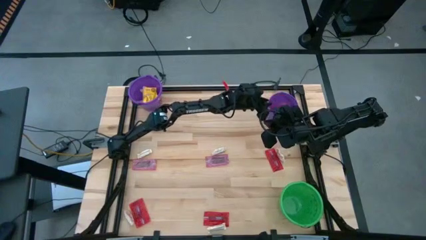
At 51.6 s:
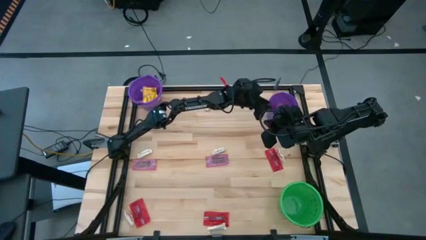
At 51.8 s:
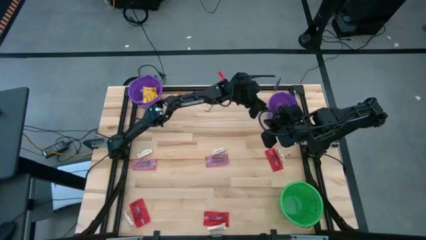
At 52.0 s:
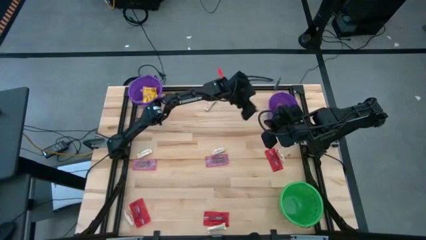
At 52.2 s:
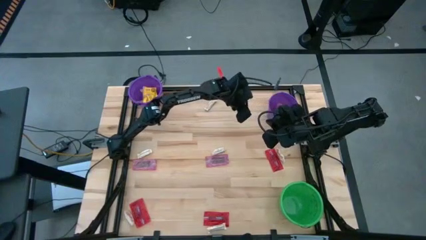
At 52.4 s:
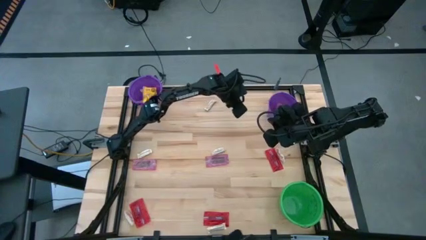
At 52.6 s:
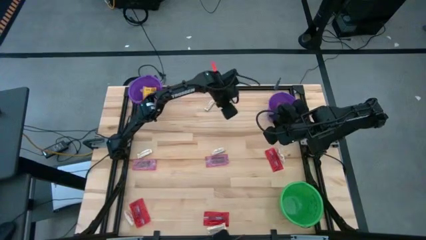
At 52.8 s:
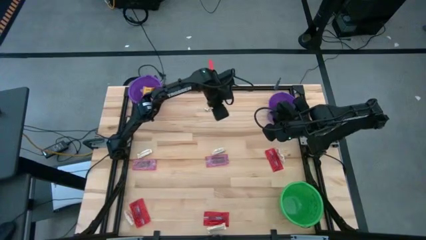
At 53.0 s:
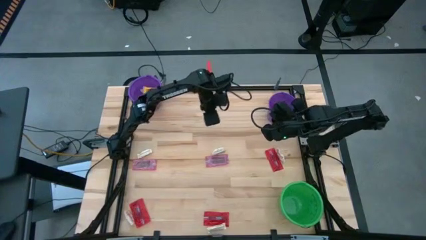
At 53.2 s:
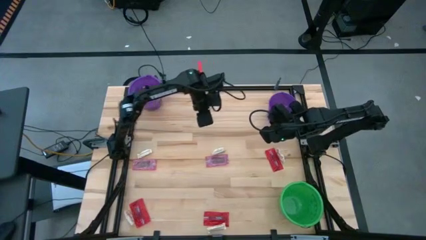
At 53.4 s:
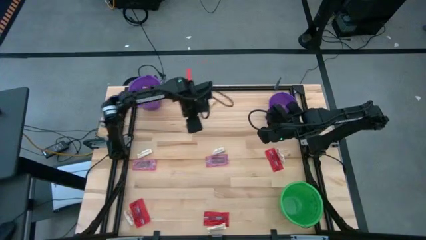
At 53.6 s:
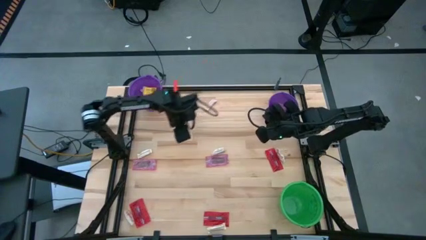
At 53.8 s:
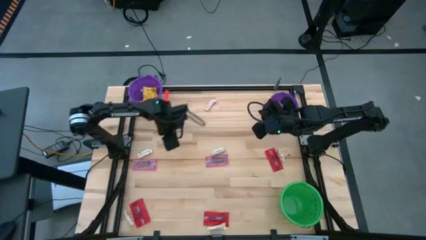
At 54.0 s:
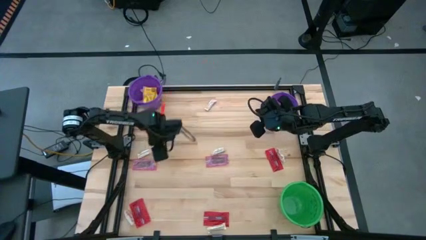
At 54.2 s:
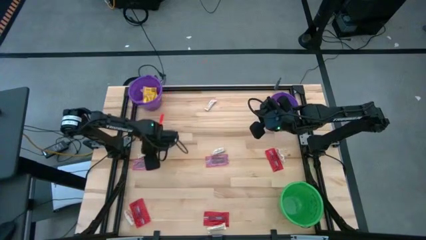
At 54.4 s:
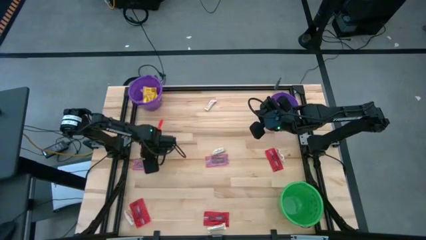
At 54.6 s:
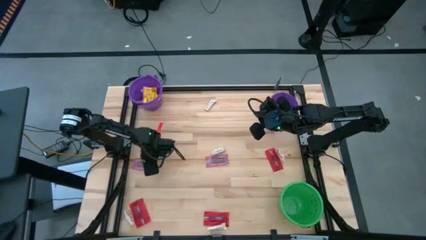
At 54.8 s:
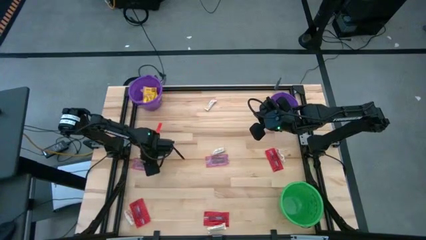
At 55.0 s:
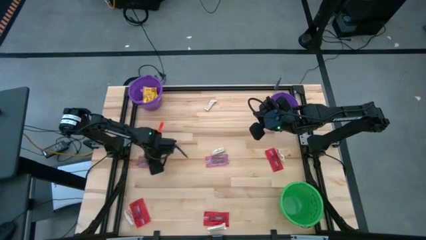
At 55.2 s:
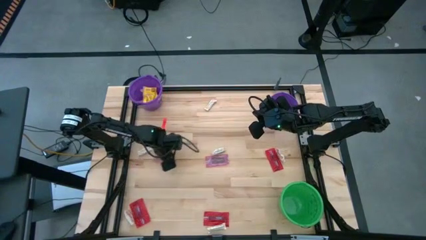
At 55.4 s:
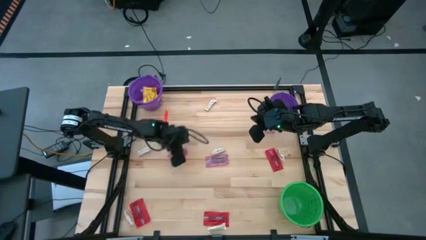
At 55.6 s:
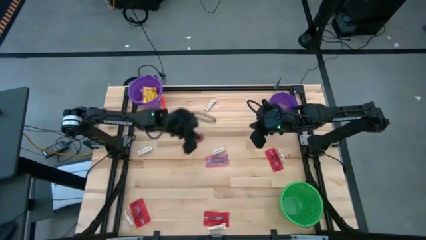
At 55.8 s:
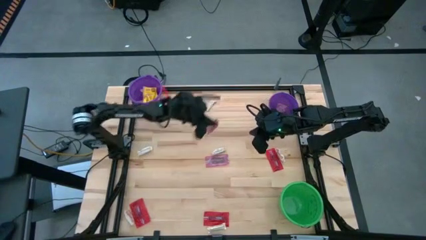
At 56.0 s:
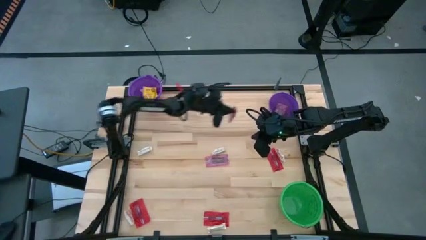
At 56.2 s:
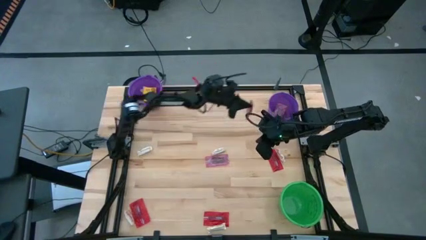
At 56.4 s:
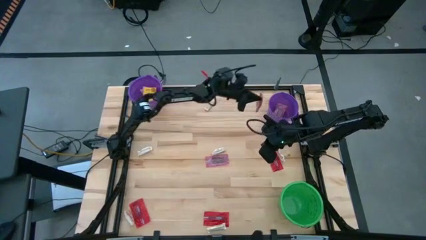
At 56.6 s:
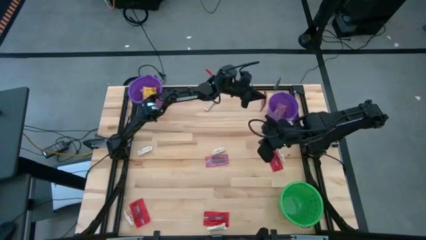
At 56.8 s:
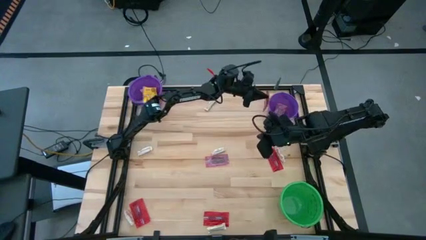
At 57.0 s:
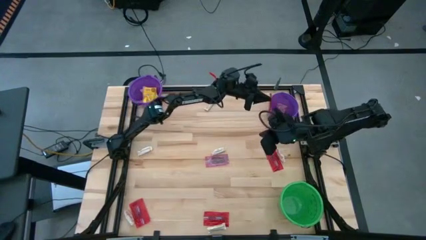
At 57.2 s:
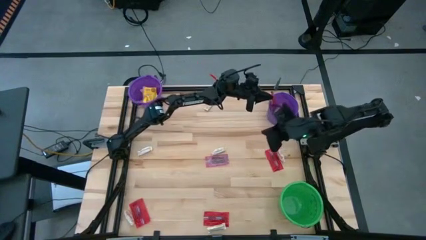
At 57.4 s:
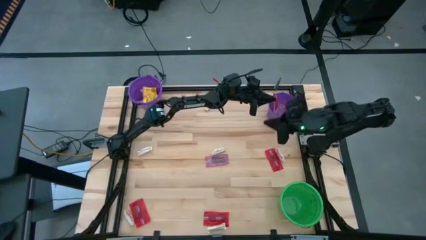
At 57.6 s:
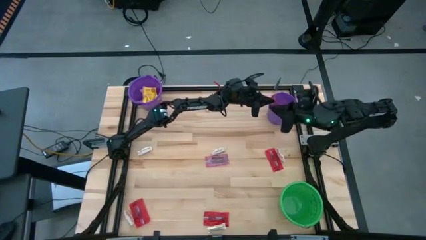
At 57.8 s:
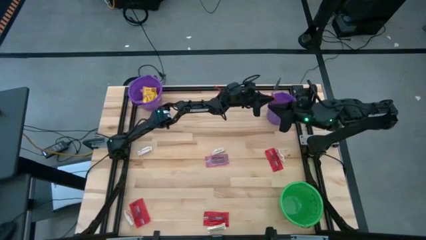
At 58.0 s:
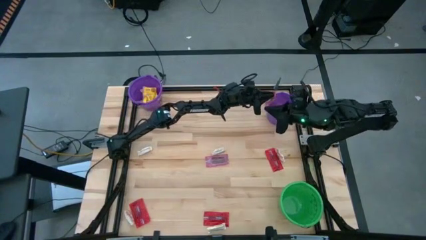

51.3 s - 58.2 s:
Task: Sort candy by brand, put in halloween buckets
Put the red candy into the right purple bucket

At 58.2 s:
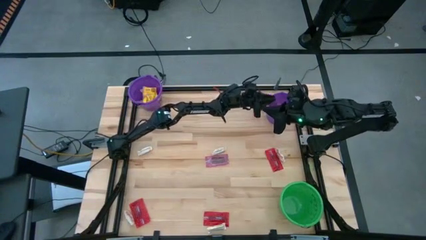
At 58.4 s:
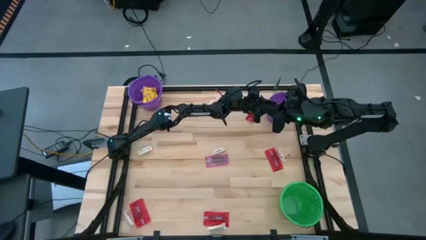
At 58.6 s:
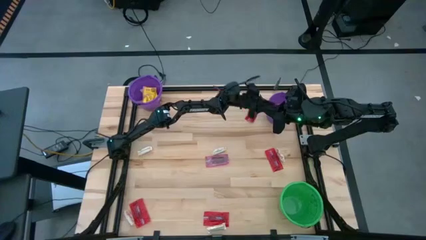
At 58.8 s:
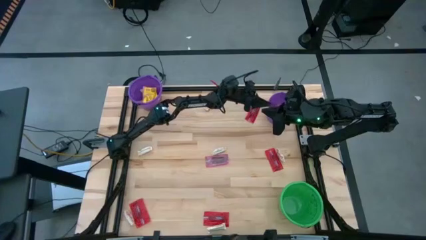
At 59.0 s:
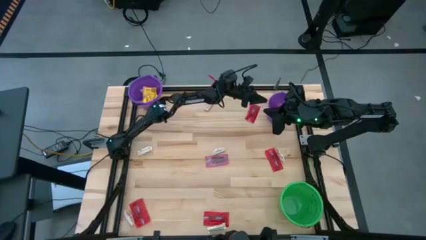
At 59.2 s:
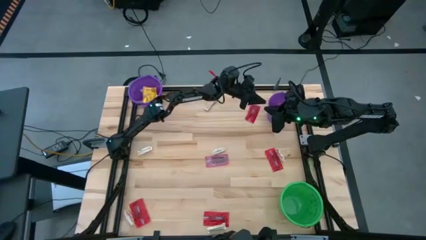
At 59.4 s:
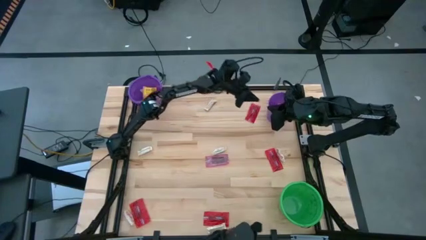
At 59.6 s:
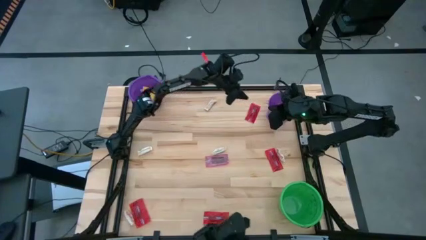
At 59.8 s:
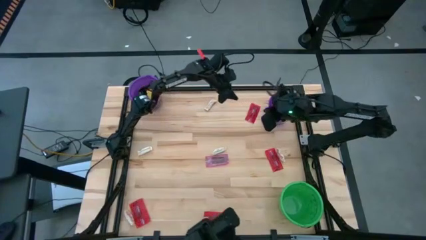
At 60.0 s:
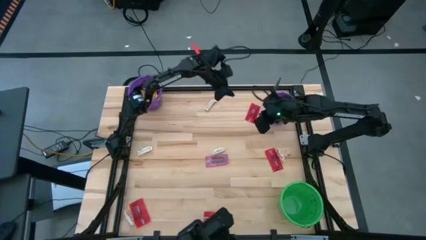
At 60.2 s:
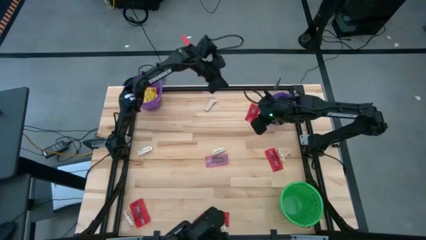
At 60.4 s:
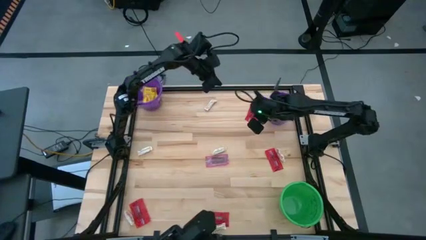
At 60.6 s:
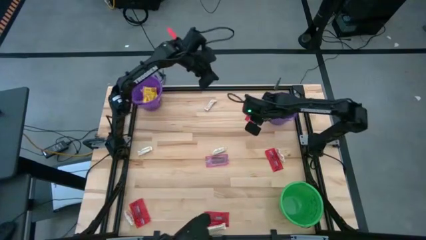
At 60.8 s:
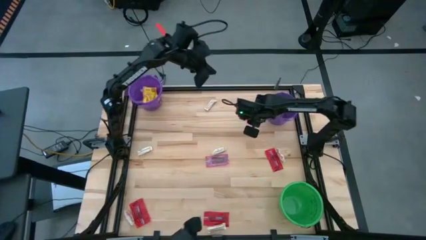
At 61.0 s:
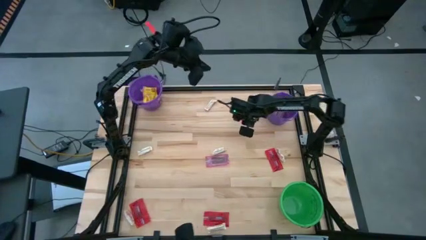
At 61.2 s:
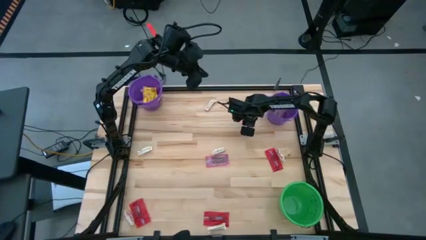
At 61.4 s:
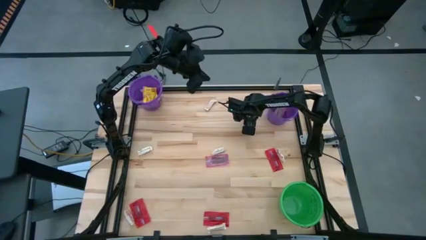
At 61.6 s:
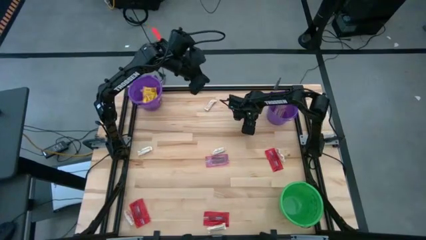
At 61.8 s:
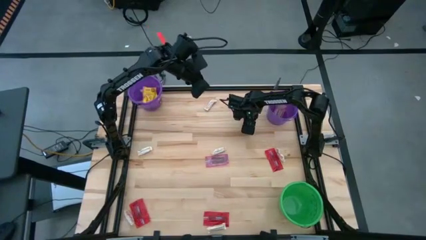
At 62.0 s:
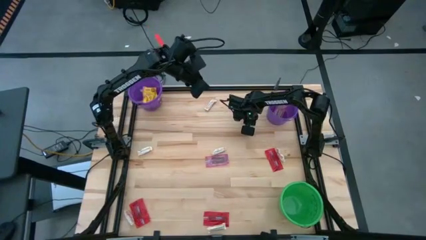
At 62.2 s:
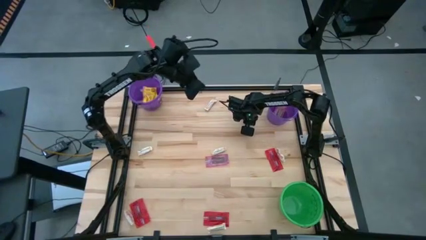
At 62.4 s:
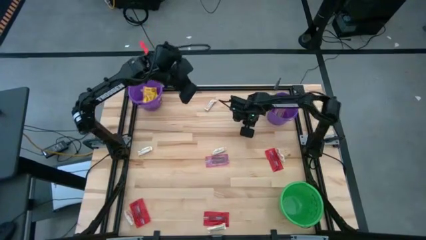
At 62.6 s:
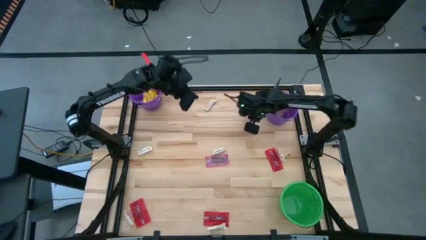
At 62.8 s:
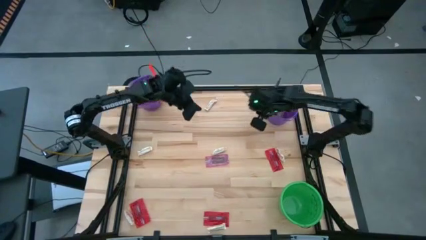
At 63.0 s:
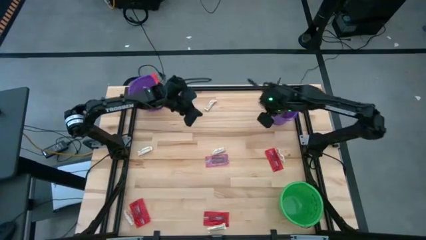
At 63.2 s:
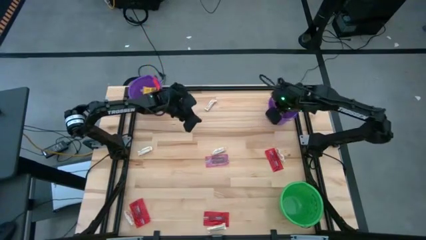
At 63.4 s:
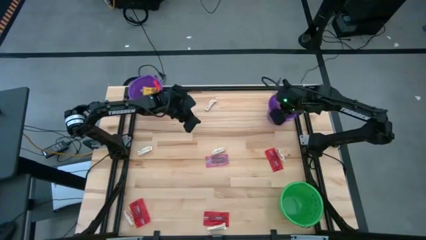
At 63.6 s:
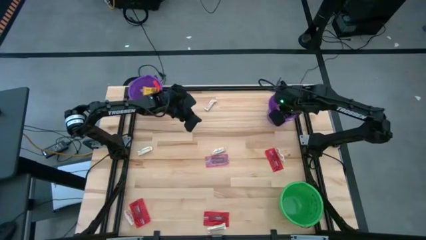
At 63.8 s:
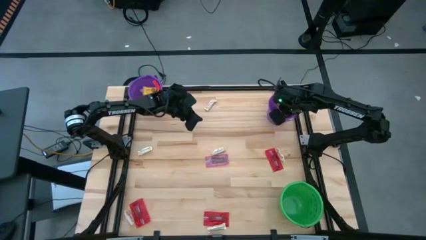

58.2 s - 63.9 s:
Put the red candy into the right purple bucket

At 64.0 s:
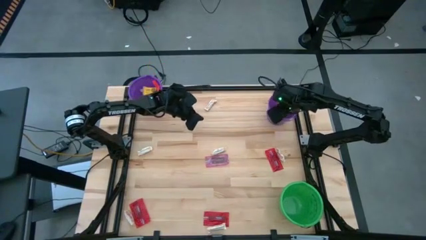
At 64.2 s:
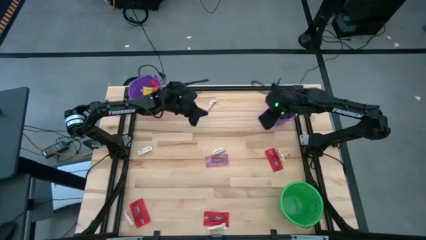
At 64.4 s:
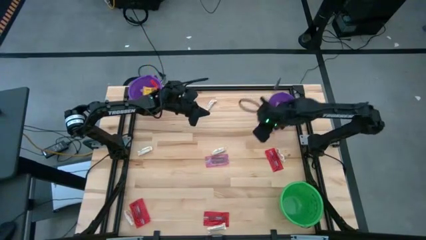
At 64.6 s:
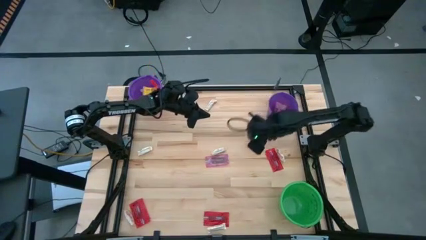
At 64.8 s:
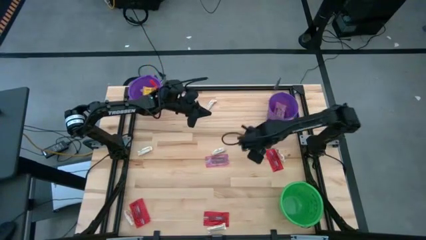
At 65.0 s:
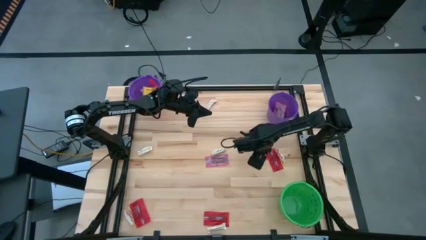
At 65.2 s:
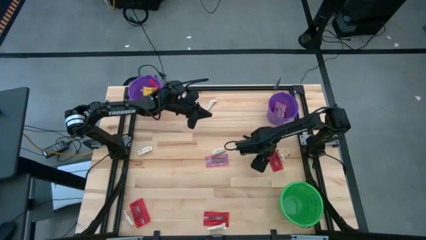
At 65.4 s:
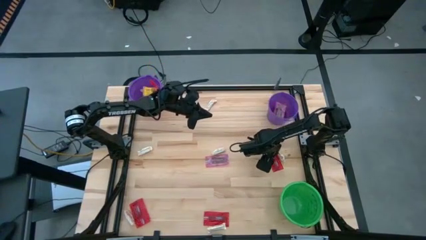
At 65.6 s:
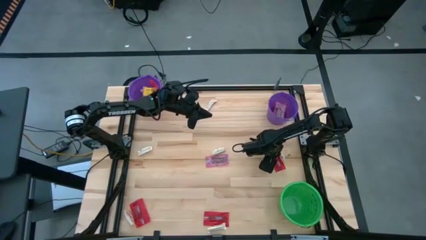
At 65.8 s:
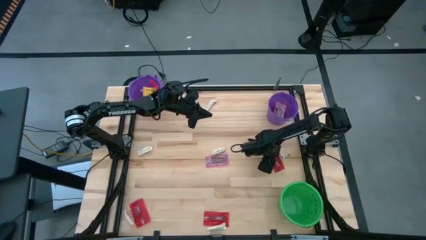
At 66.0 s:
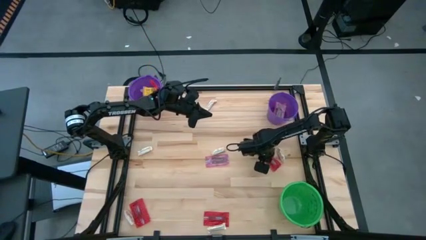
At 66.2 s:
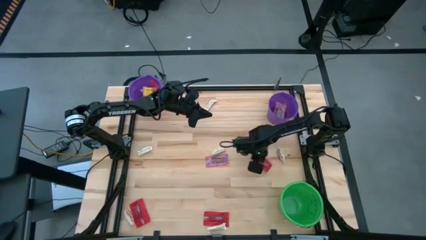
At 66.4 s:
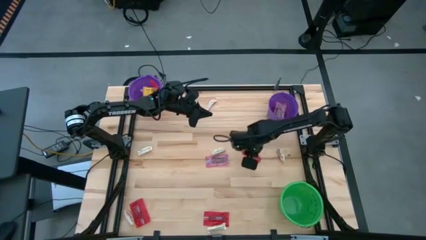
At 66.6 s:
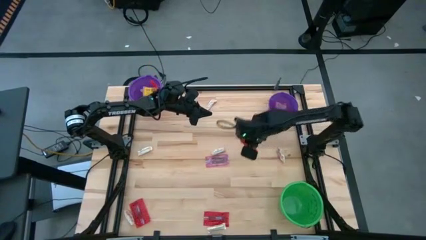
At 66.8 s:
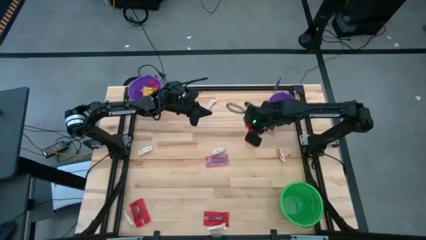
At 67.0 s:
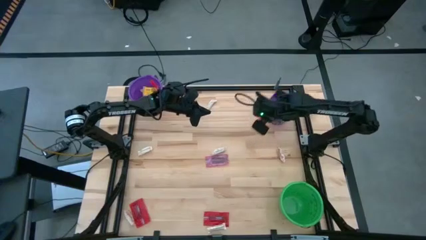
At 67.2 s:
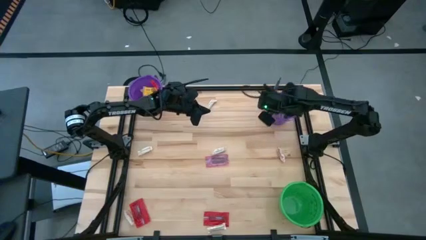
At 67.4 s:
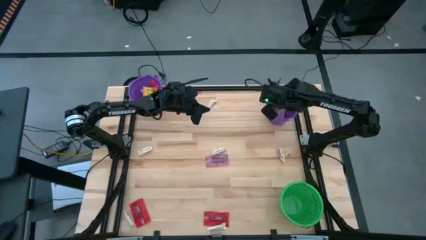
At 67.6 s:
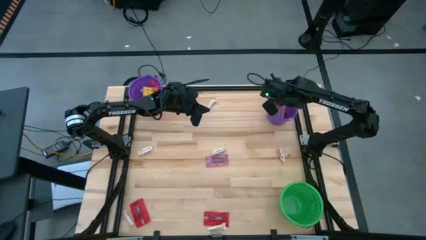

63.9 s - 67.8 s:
Put the red candy into the right purple bucket
